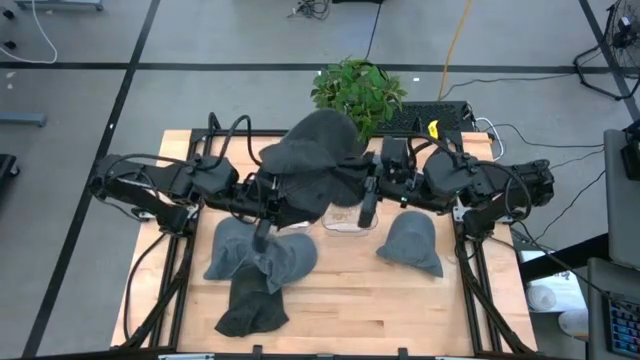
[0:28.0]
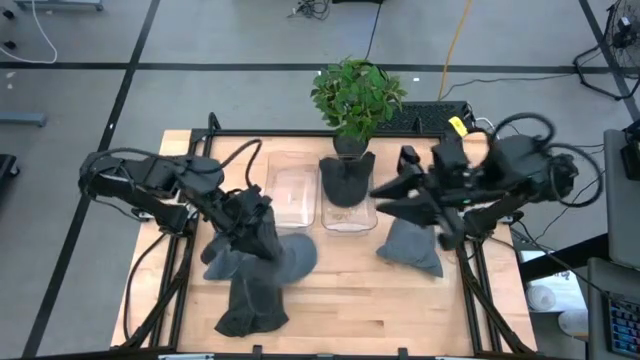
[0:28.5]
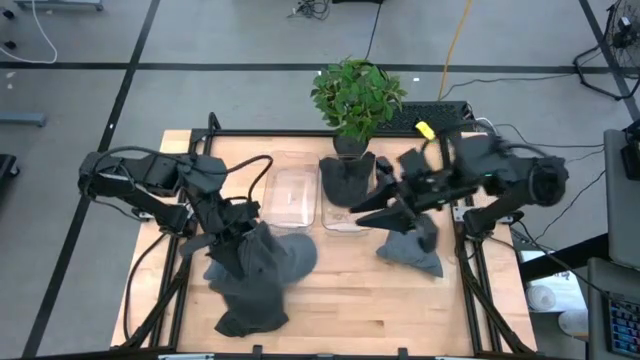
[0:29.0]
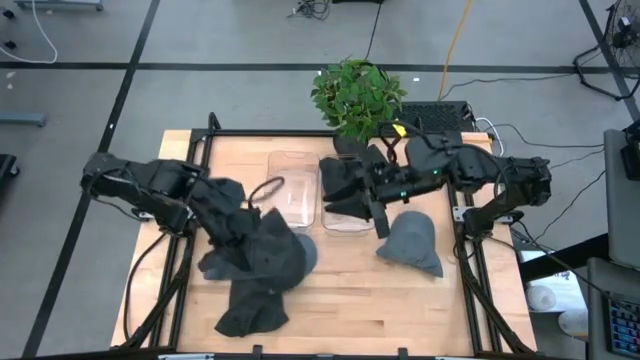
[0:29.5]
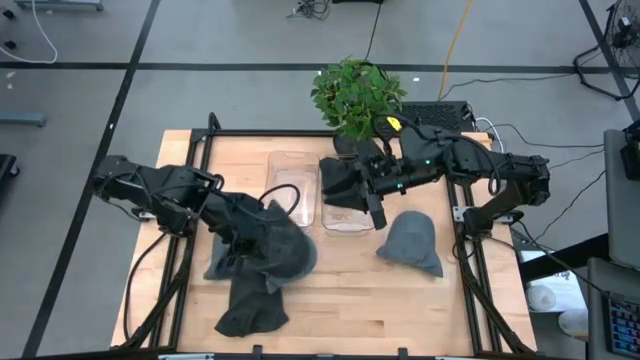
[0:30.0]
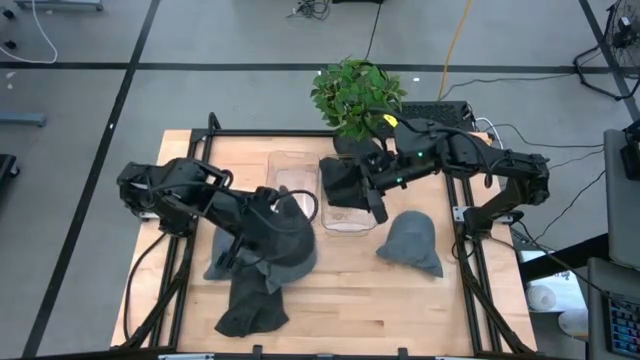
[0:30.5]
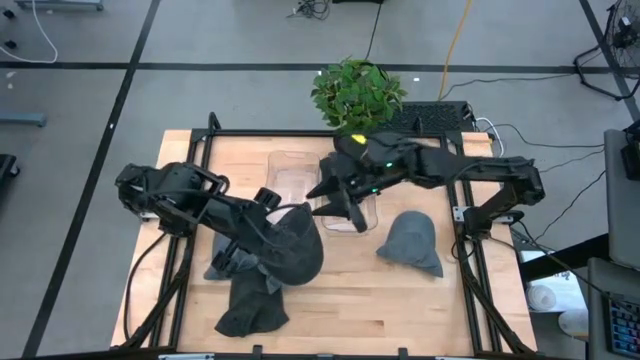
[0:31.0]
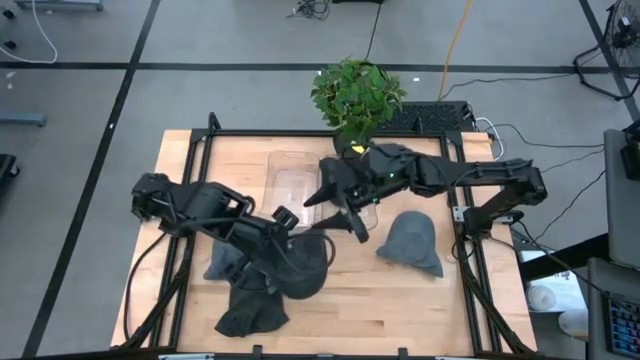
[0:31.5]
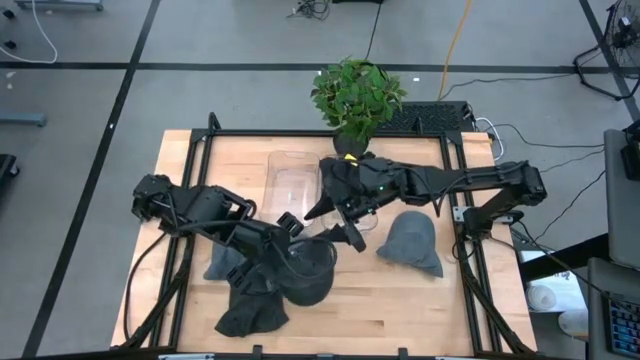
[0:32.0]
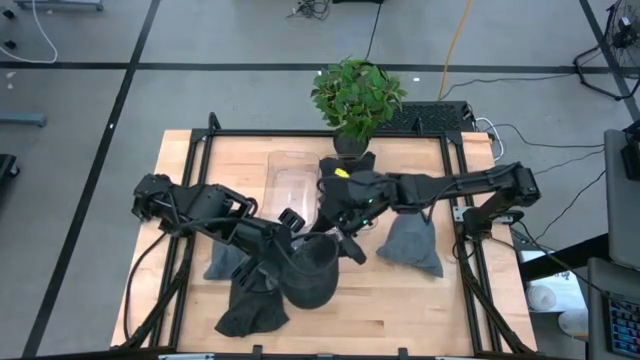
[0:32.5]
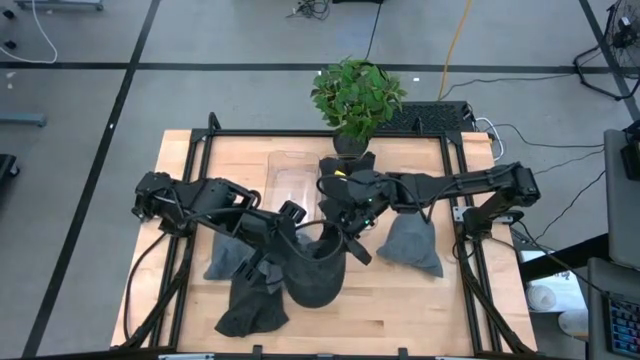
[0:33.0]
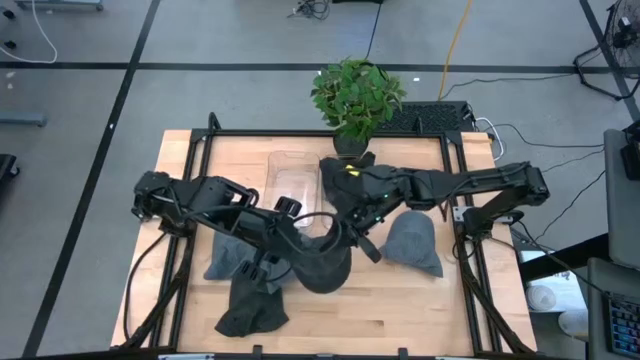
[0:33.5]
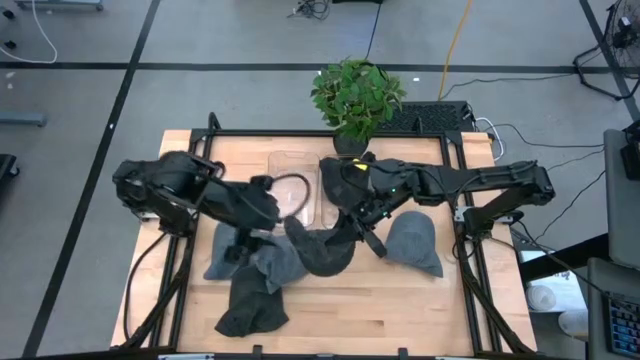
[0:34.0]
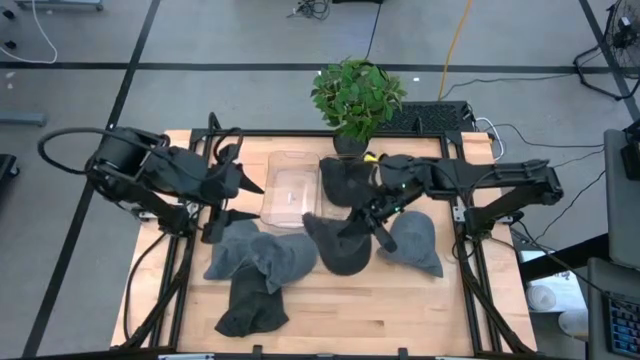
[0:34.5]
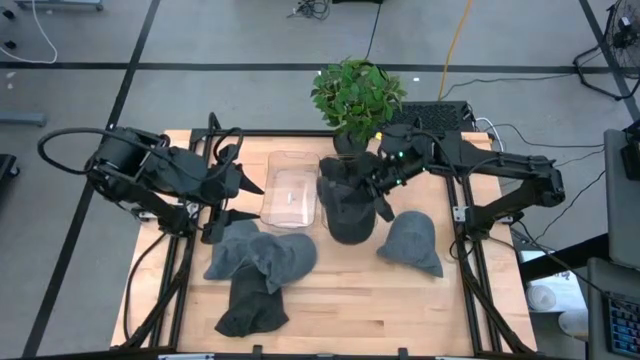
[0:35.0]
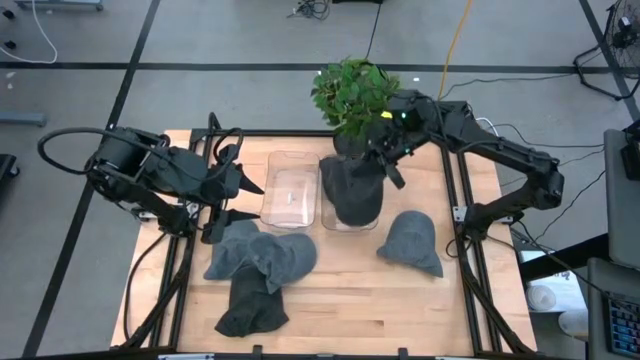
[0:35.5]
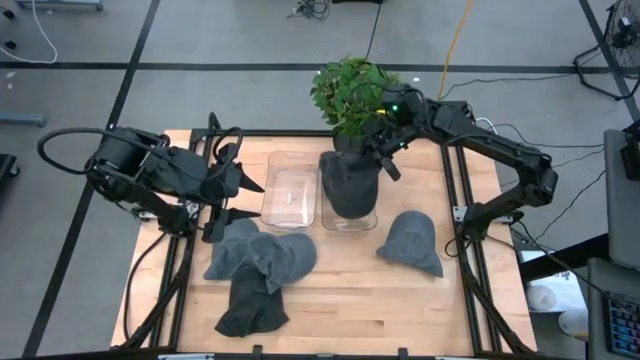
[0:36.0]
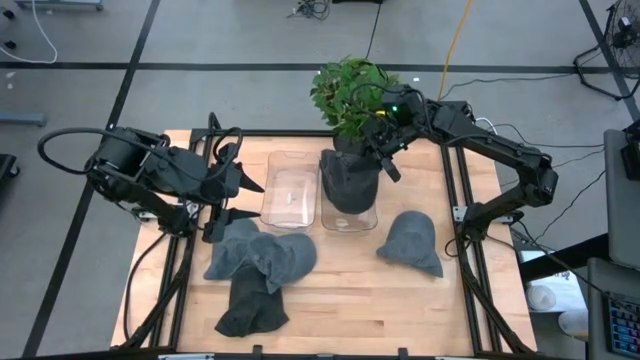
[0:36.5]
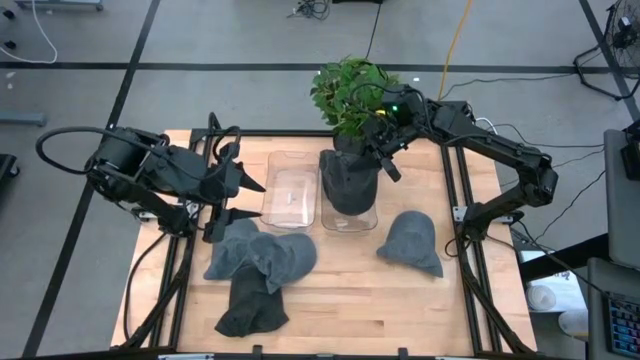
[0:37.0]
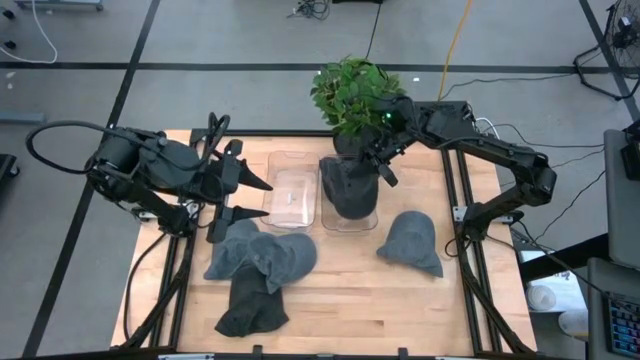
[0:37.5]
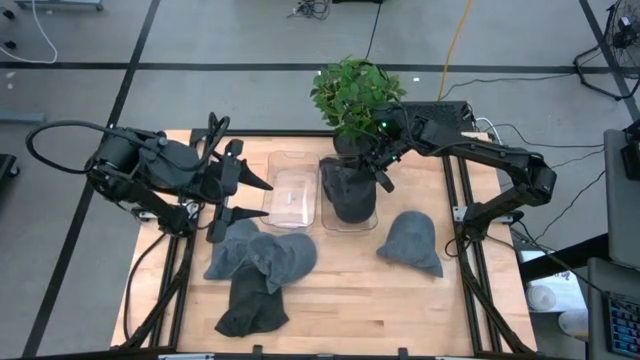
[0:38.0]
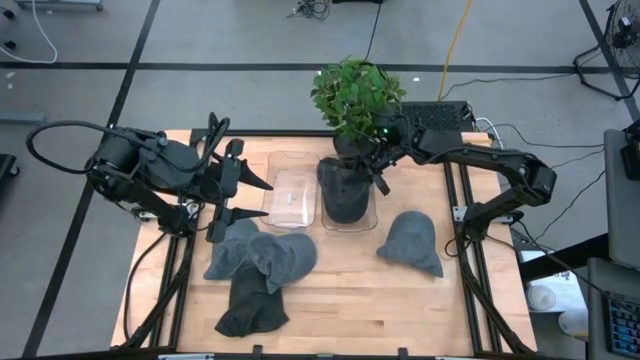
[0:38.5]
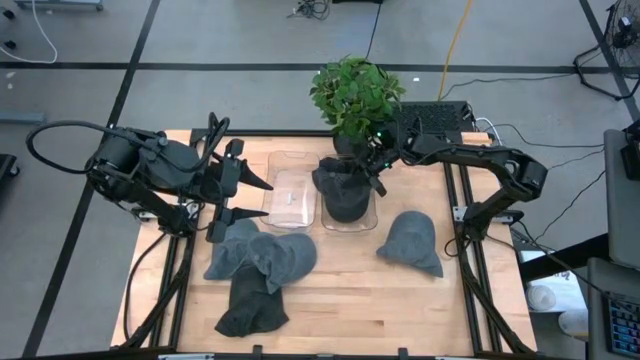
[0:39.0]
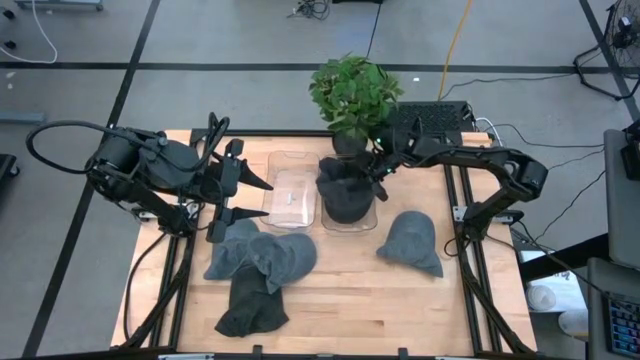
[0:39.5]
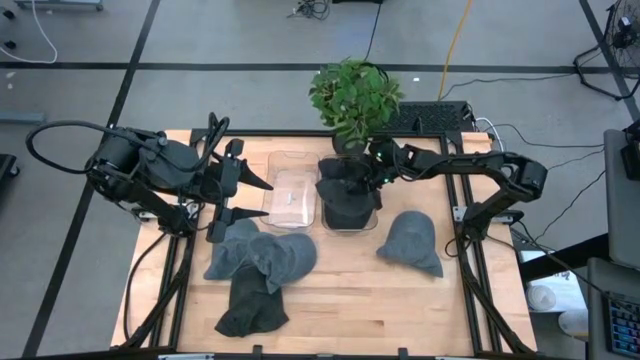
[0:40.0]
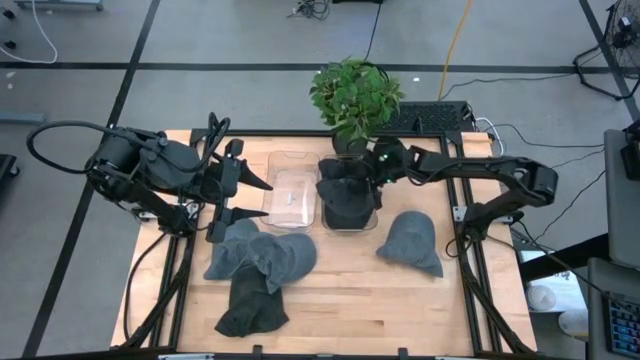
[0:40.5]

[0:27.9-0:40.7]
Task: Pick & Place hat
Put the right black cap into the right transparent bin

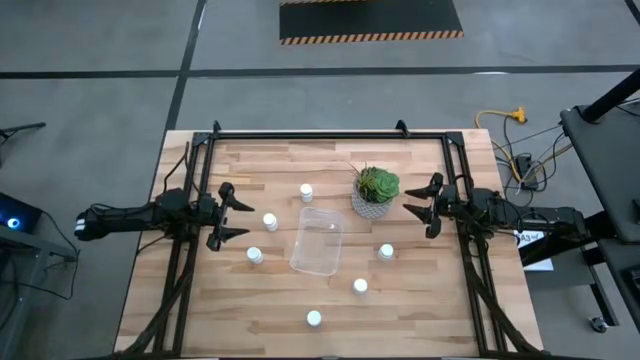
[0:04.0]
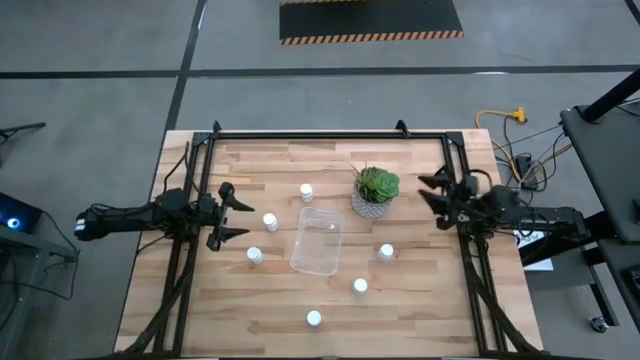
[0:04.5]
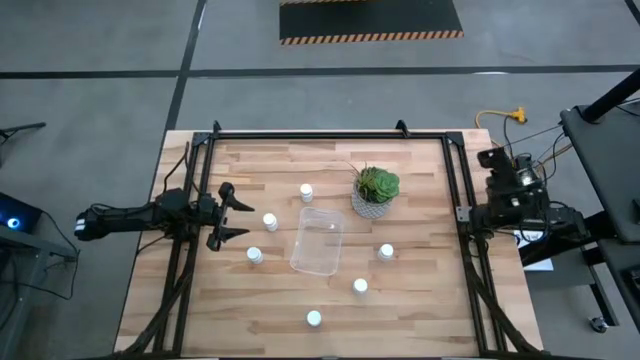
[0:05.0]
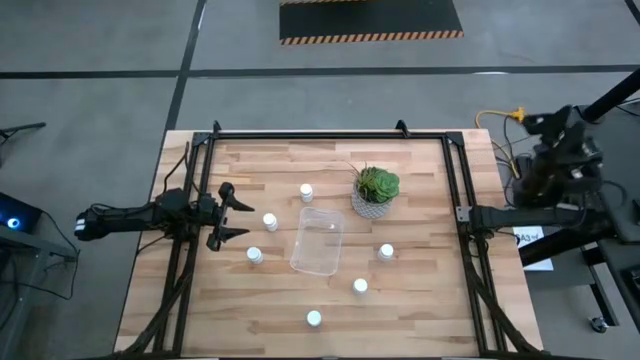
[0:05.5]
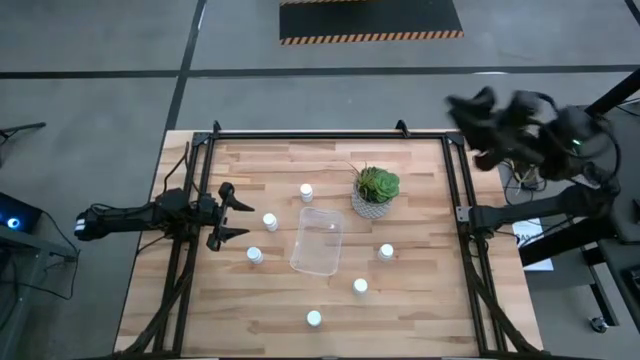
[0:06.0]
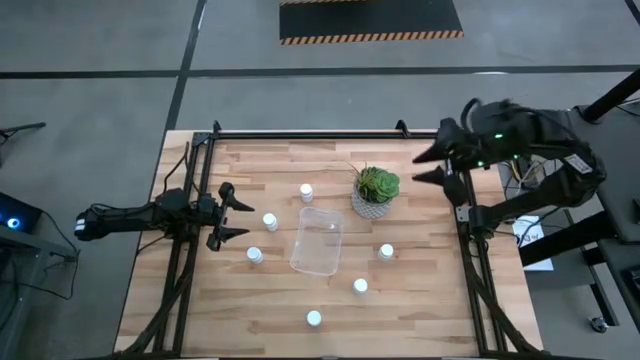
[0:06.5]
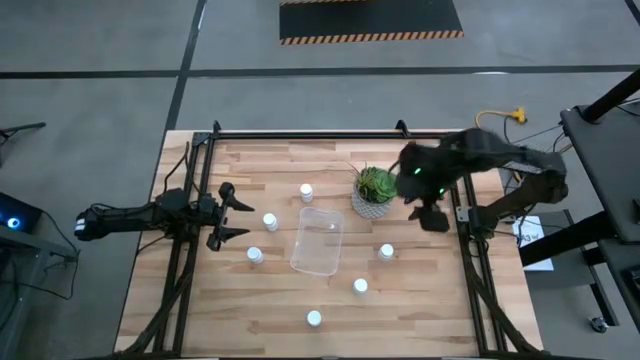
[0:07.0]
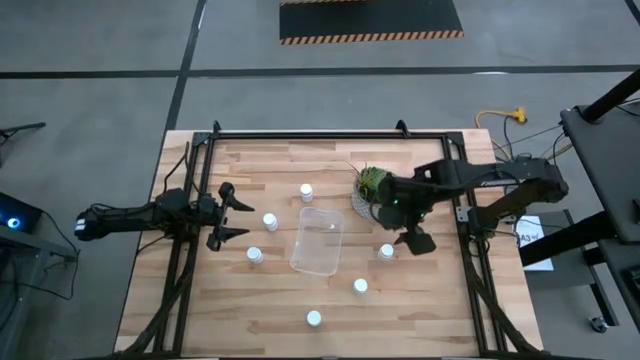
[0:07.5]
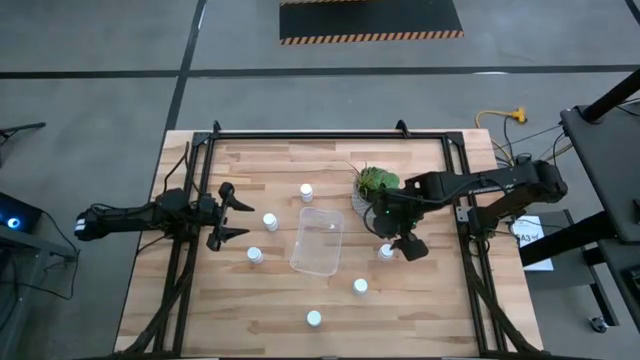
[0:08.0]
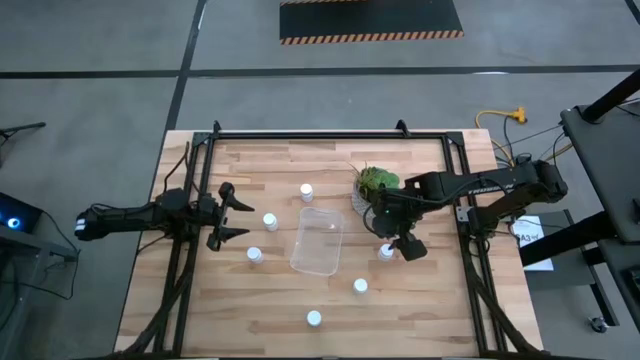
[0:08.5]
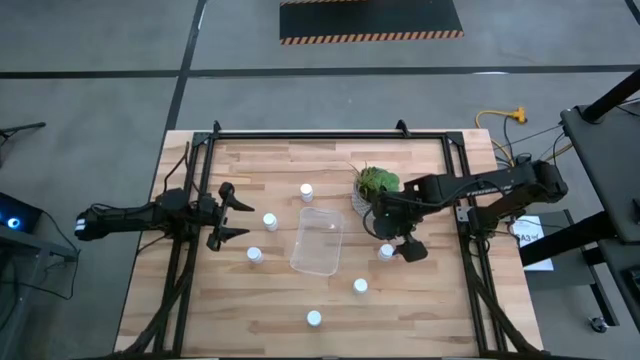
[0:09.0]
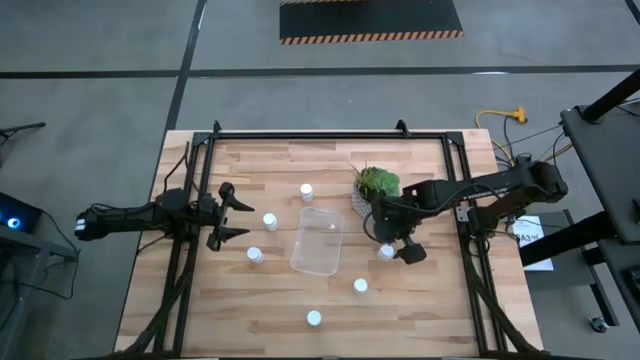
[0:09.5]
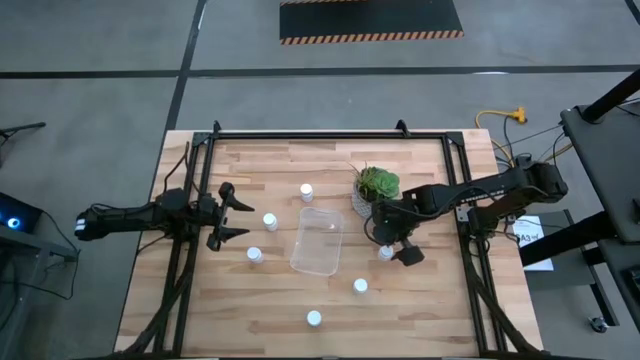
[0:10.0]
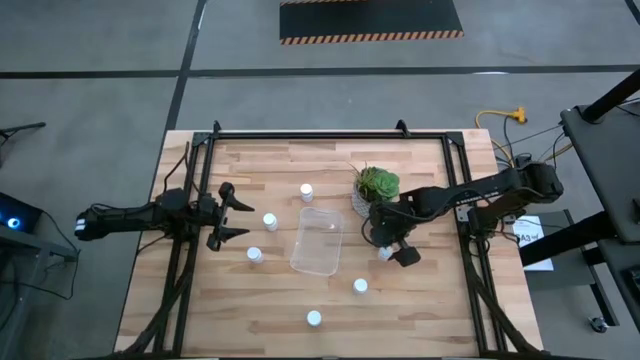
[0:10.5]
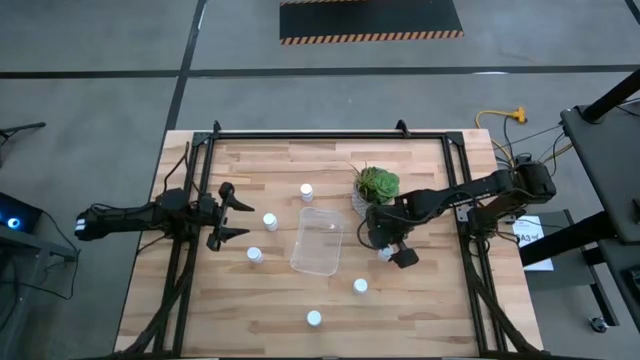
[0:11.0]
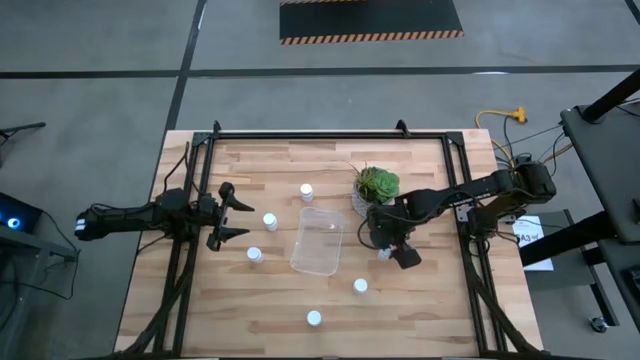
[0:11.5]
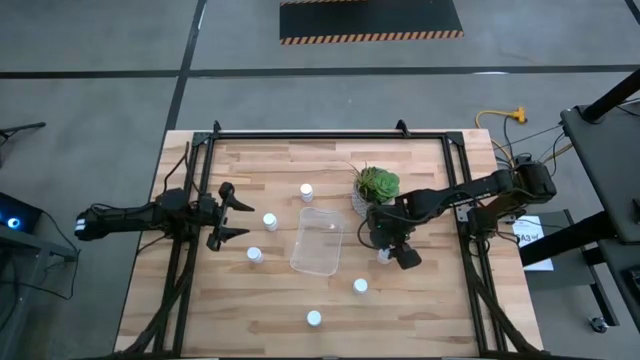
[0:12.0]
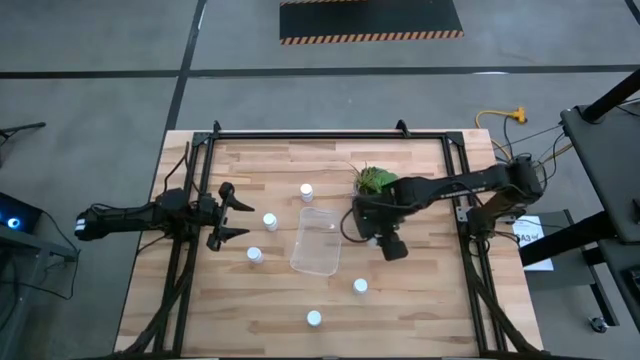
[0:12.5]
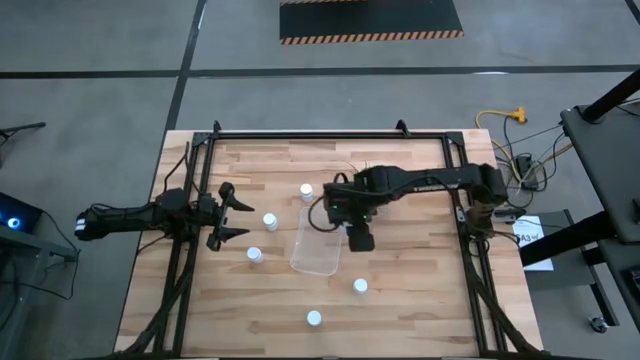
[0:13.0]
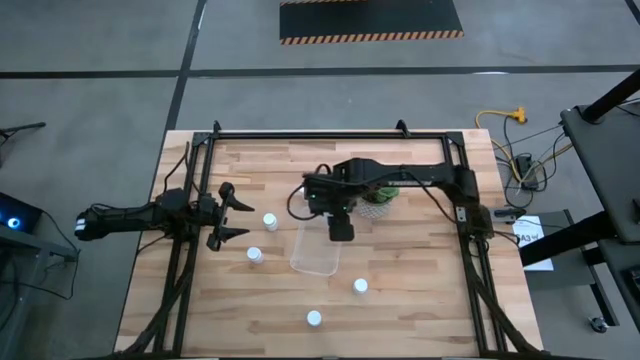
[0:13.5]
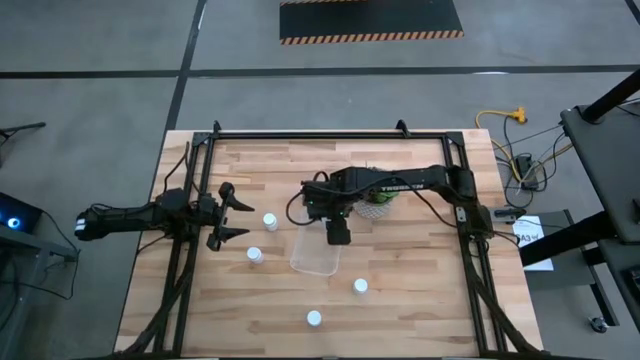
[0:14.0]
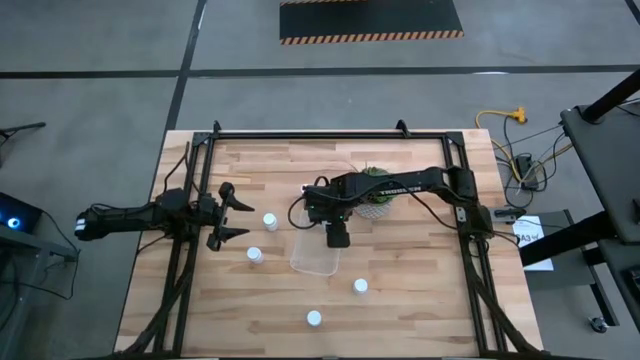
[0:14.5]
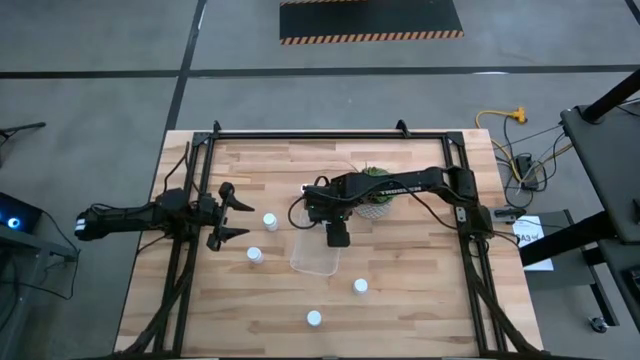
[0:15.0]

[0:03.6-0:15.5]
Task: Pick and place pill bottles into a basket
Put the white medicine bottle into the transparent bin
